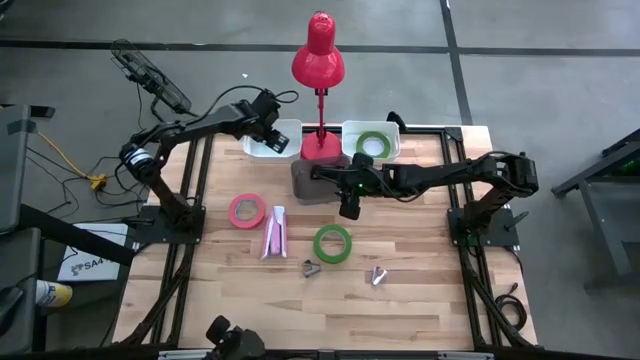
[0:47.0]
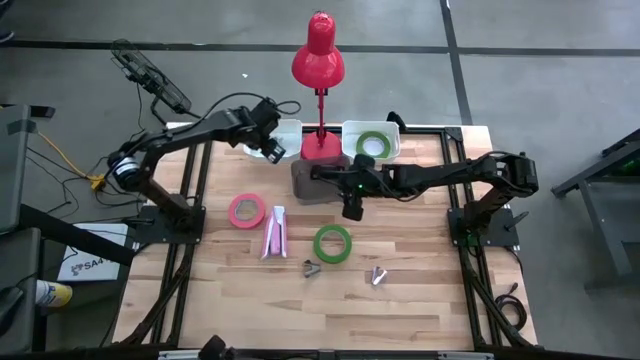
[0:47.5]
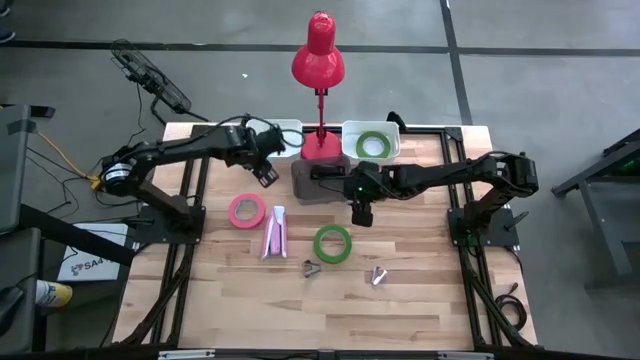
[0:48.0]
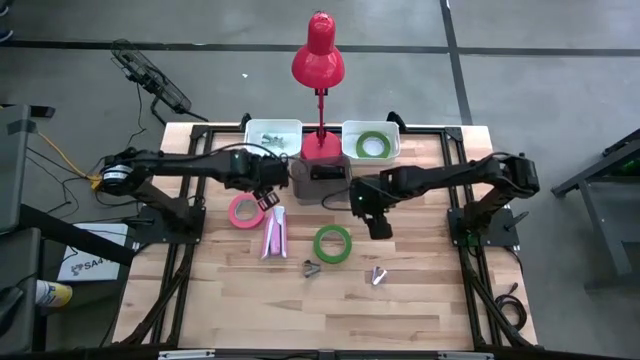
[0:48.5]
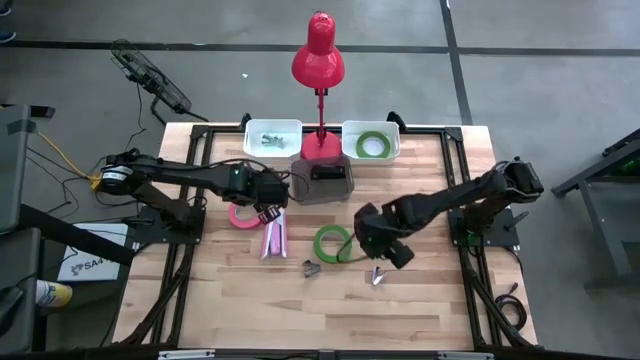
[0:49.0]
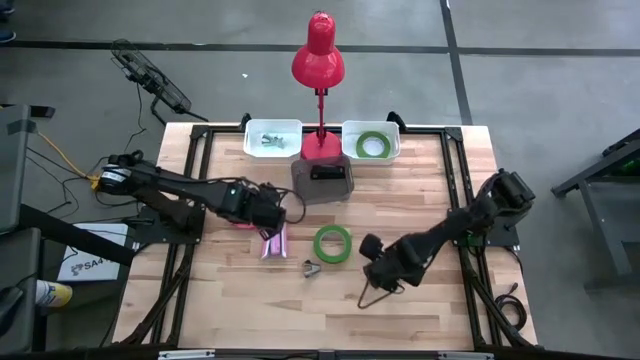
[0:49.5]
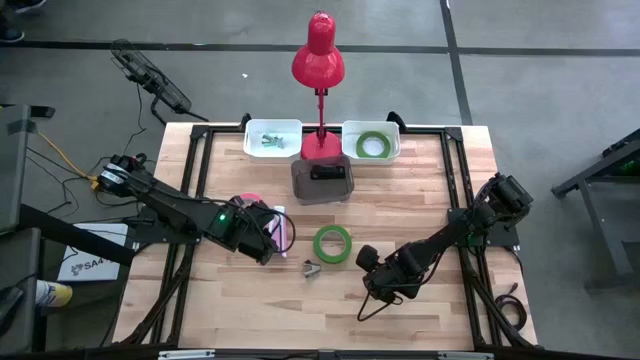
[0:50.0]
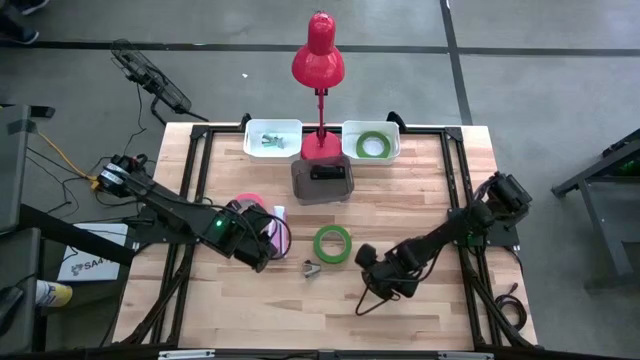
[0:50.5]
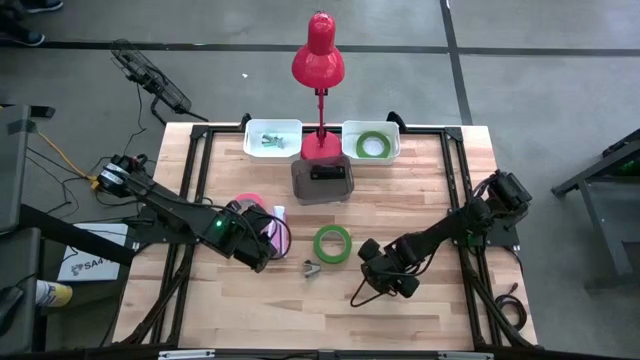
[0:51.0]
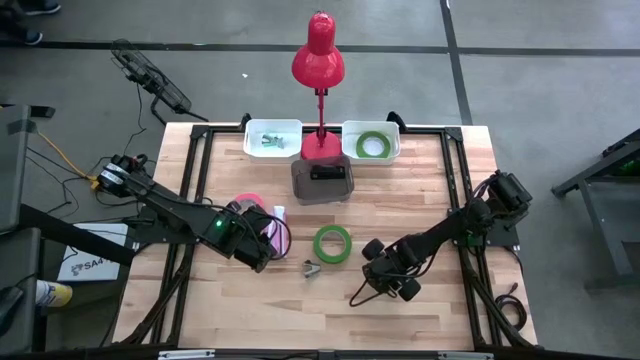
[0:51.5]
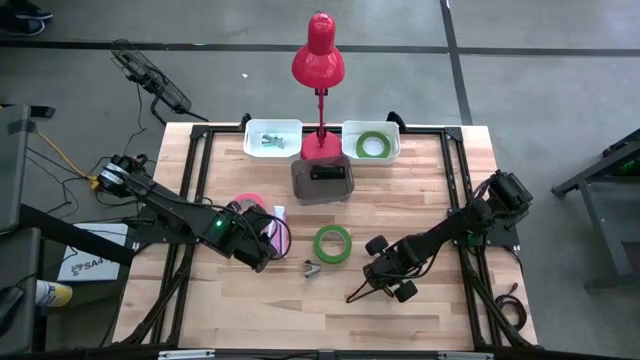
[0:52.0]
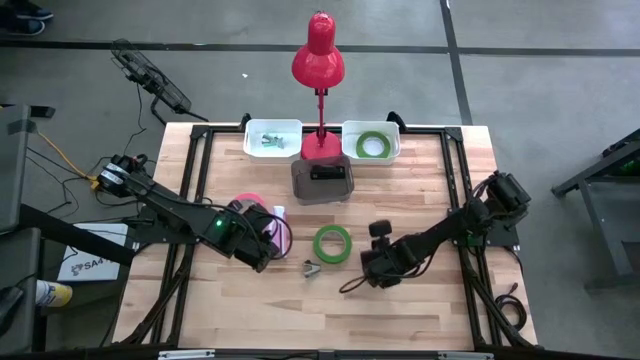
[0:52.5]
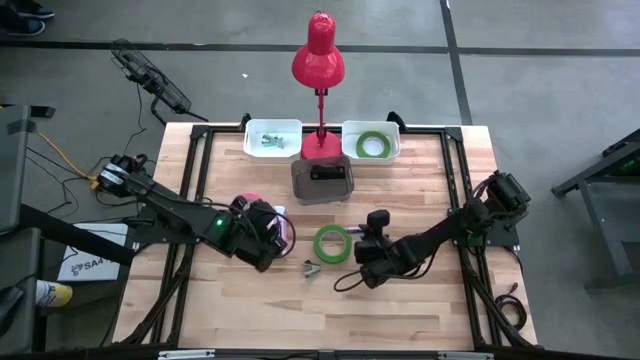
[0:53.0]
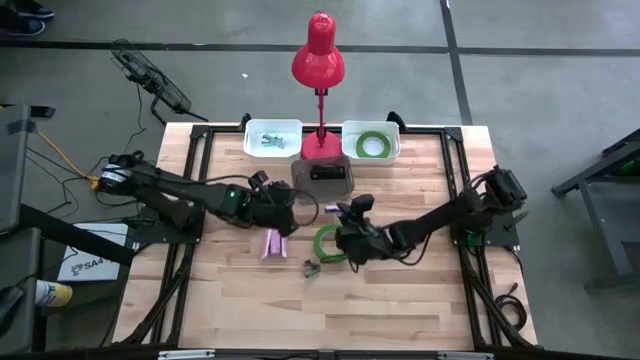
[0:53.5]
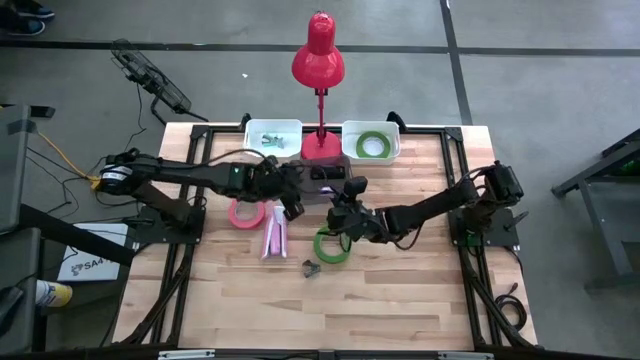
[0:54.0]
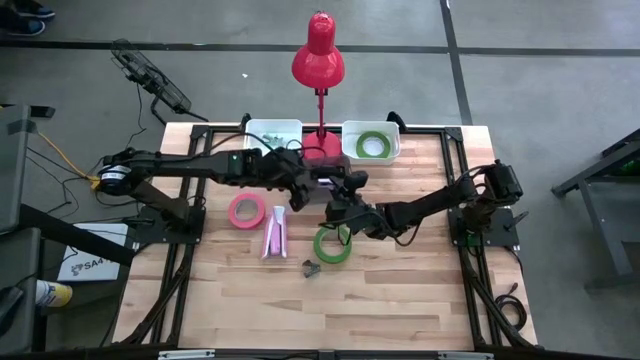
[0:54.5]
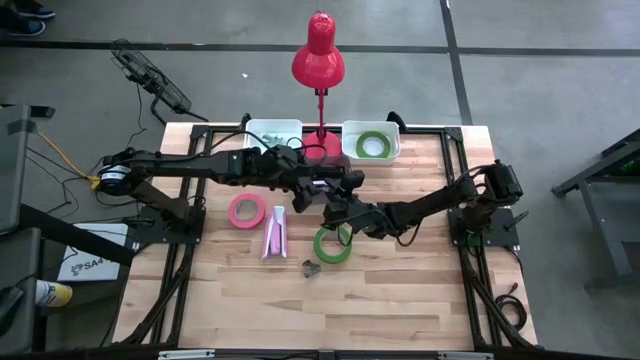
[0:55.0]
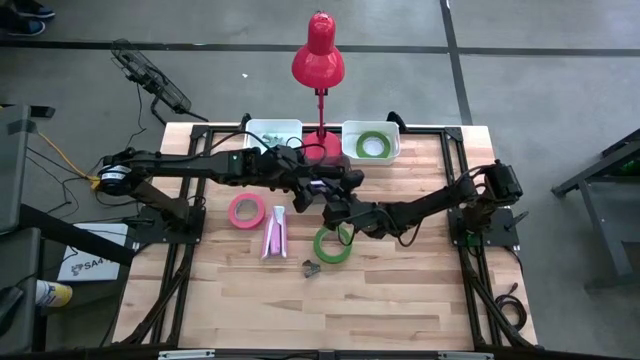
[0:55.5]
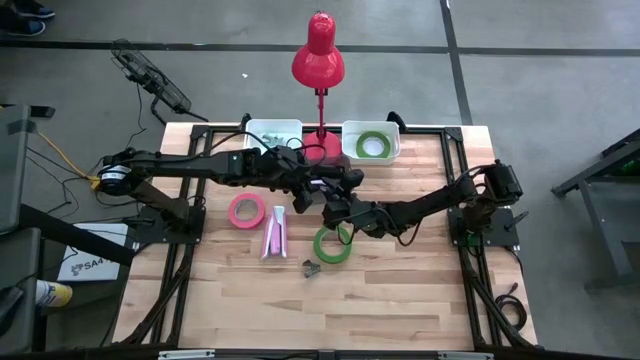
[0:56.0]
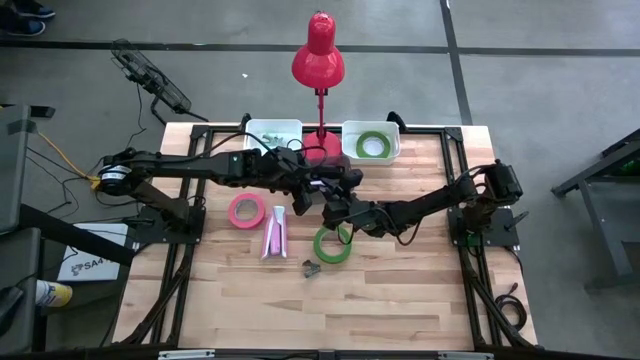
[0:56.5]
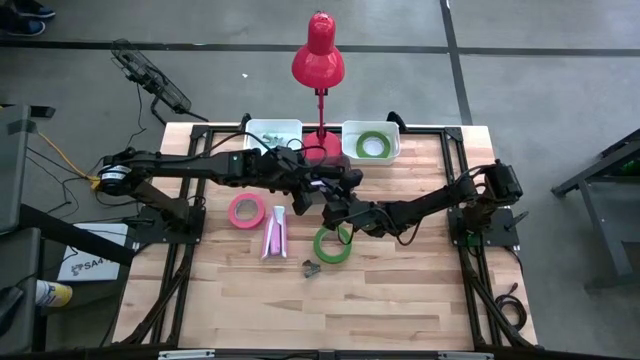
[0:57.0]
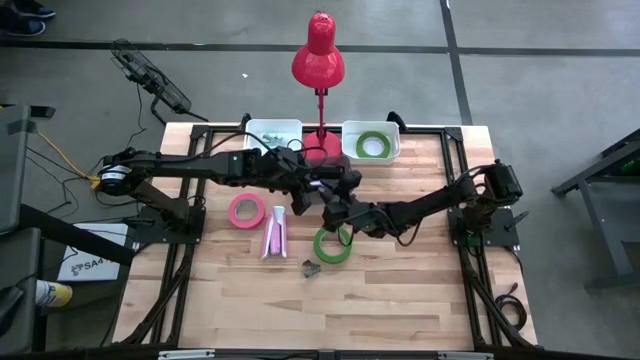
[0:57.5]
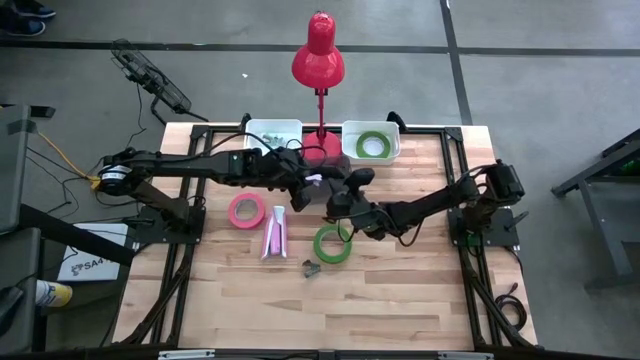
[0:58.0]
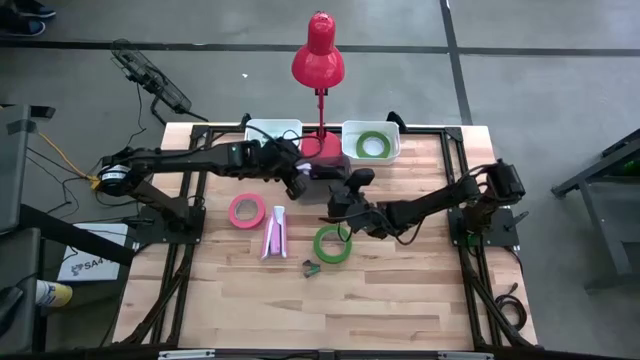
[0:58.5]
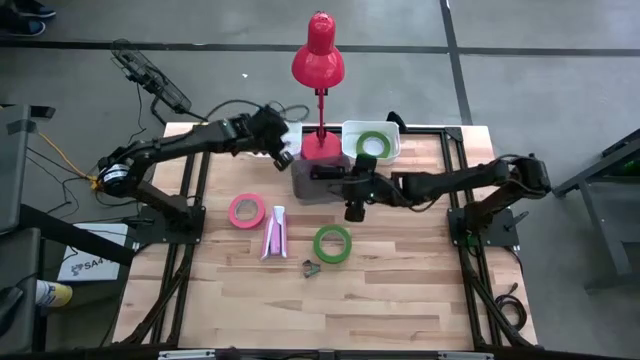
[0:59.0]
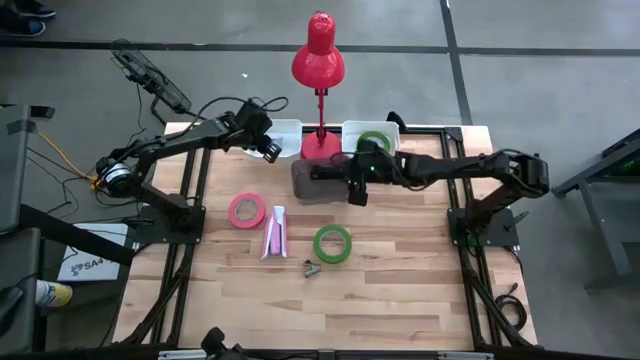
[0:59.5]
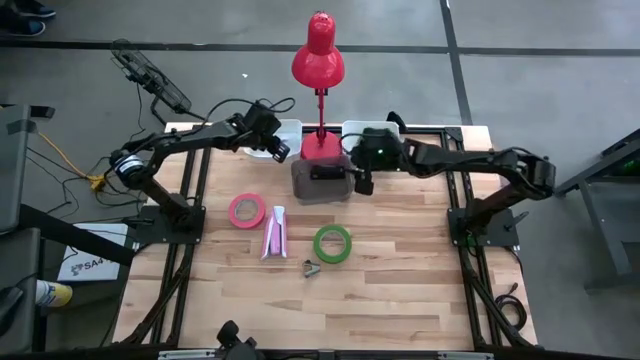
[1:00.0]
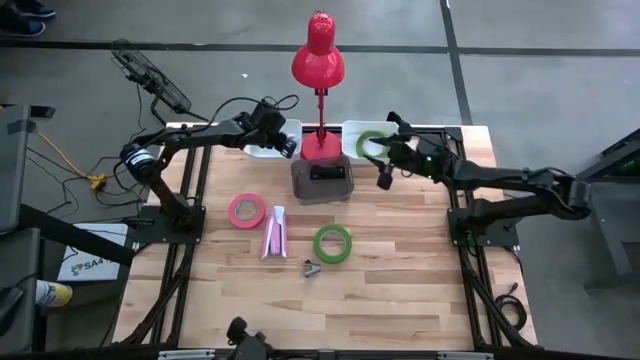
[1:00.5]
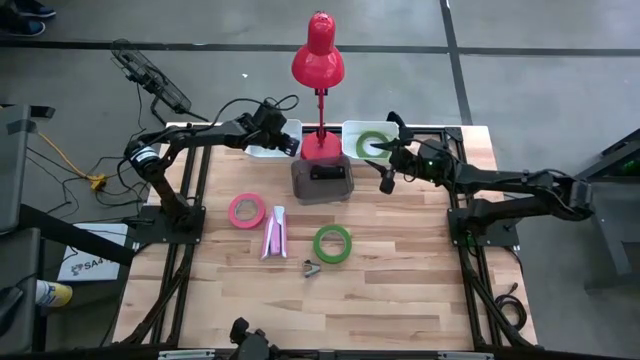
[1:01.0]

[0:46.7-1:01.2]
Task: Pick and place Stapler, Stapler remover, tape
Put the purple staple remover into the left white bin

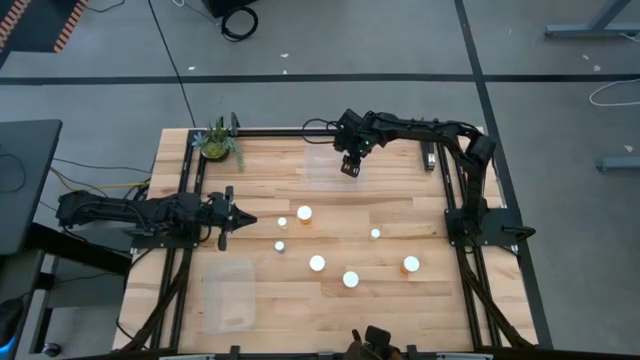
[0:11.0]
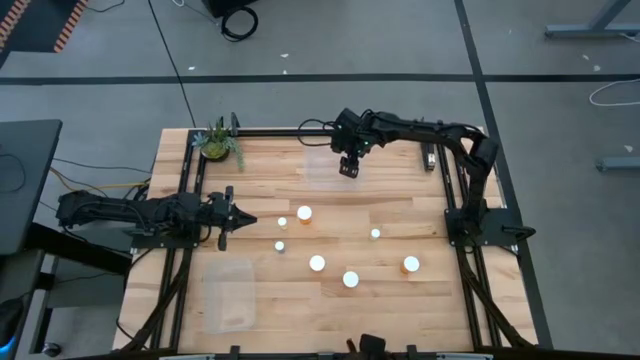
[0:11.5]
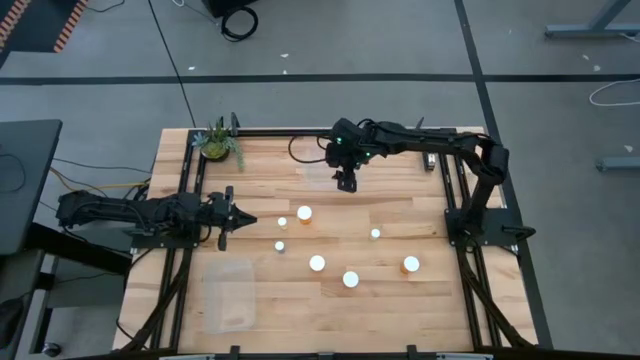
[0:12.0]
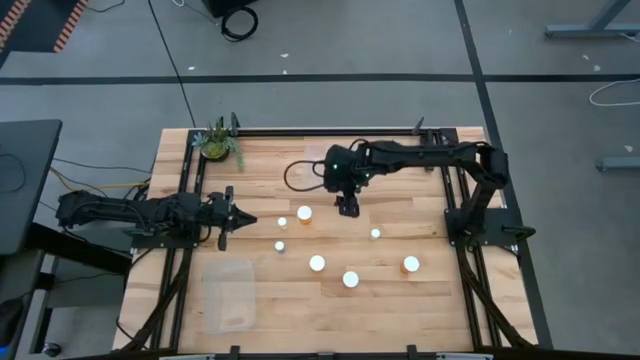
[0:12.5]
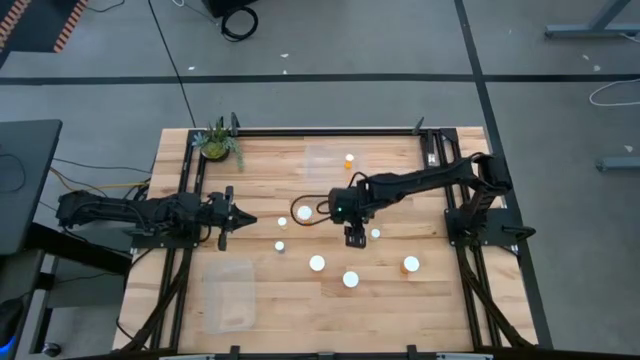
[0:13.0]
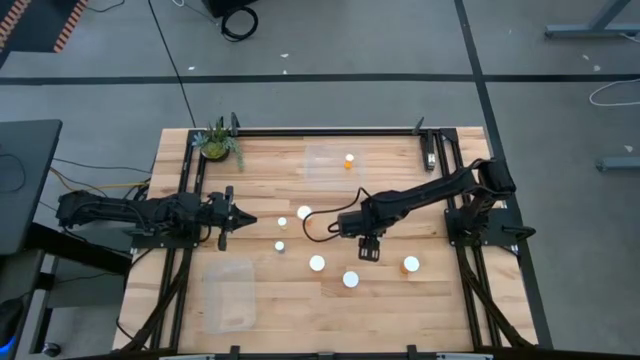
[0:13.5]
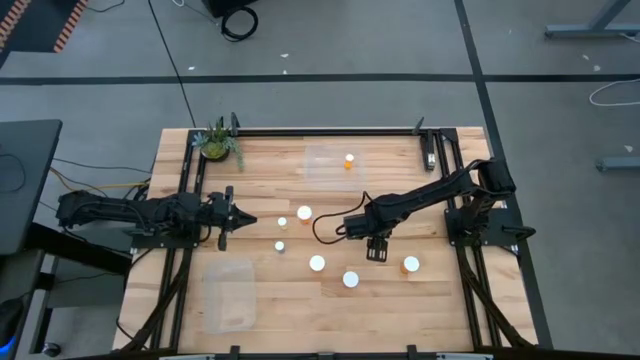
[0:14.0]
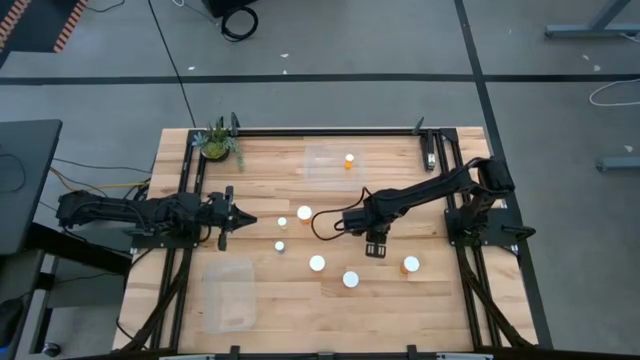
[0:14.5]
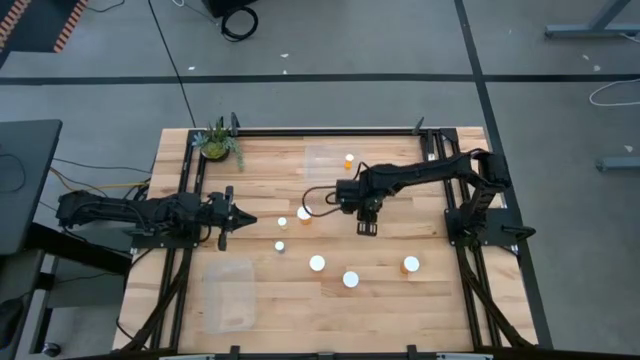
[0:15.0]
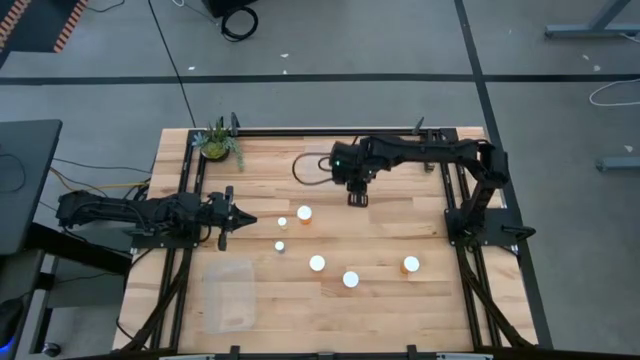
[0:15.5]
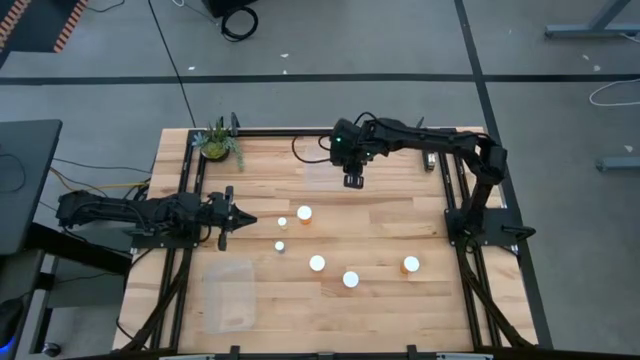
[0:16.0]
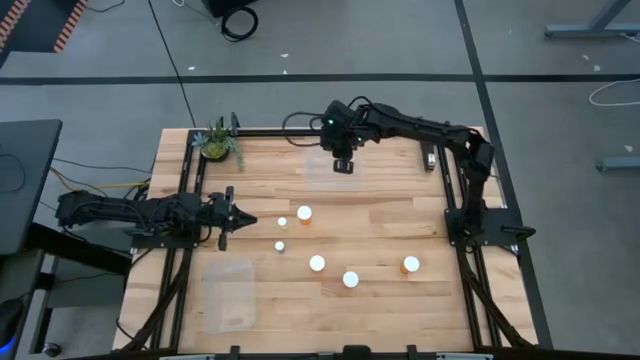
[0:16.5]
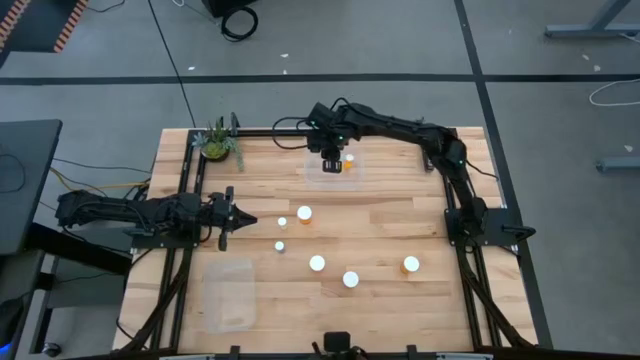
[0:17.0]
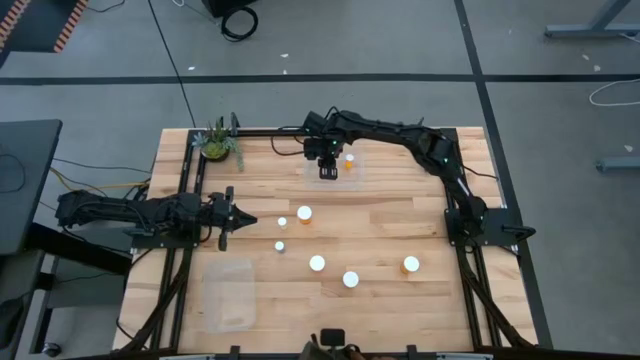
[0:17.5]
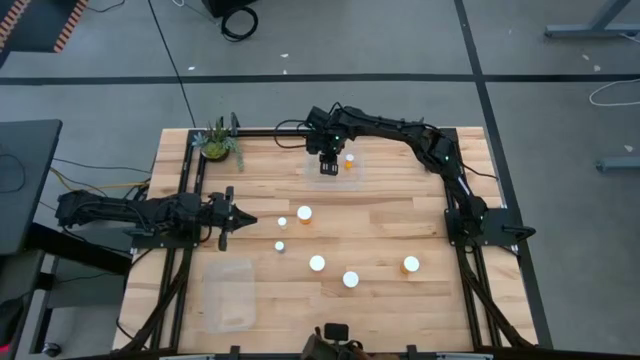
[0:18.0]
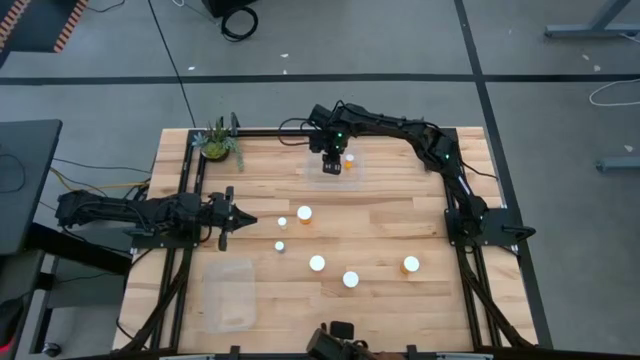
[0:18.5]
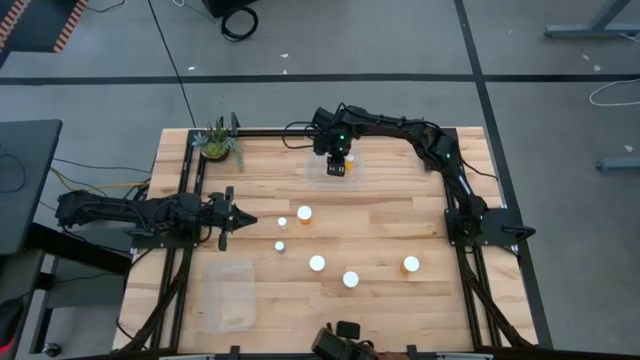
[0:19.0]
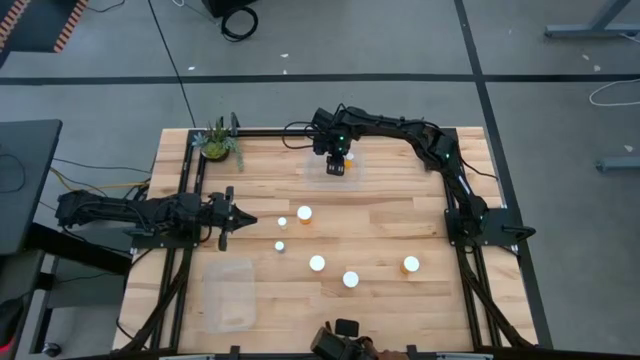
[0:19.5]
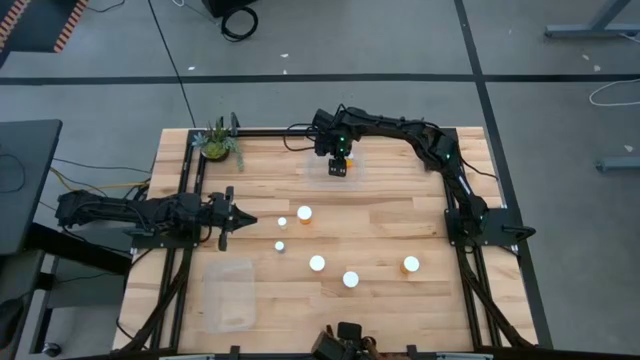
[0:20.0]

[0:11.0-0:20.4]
Task: Pick and place medicine bottles into bin by pill shape (circle, oval)
Put the yellow tablet bottle into the top transparent bin
